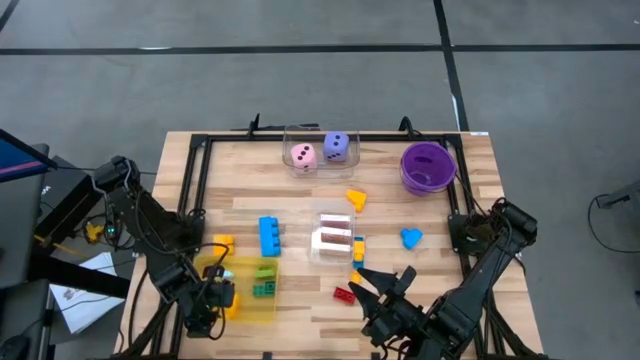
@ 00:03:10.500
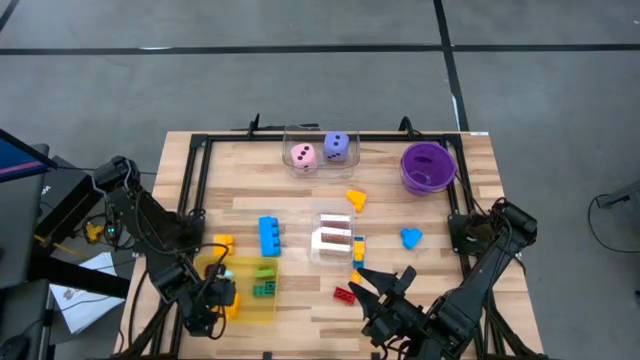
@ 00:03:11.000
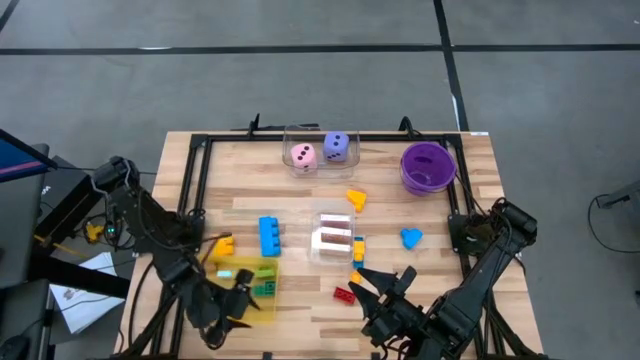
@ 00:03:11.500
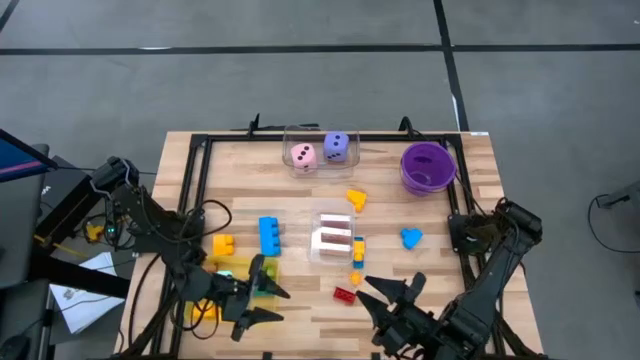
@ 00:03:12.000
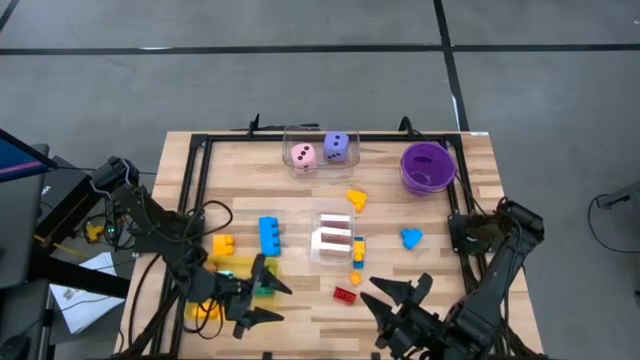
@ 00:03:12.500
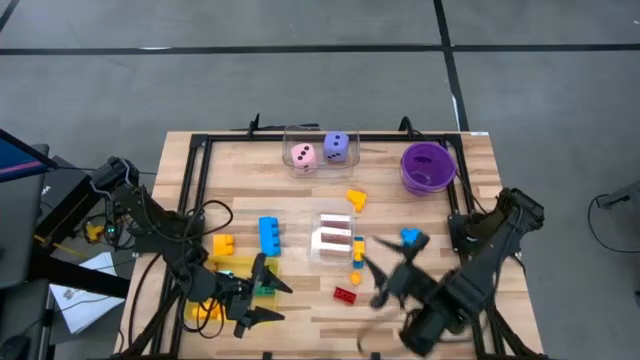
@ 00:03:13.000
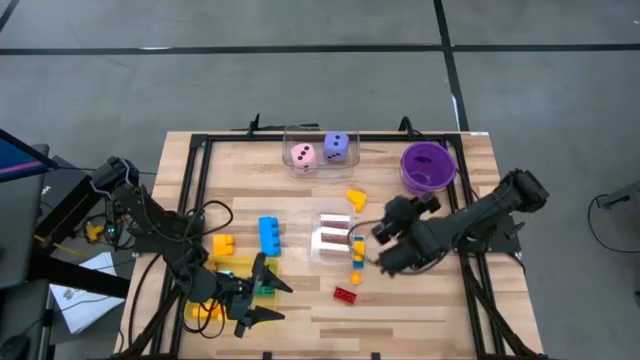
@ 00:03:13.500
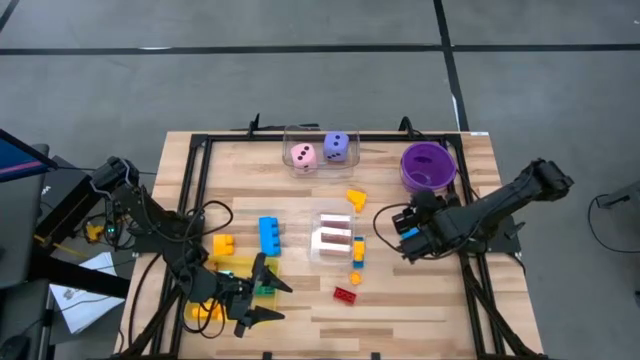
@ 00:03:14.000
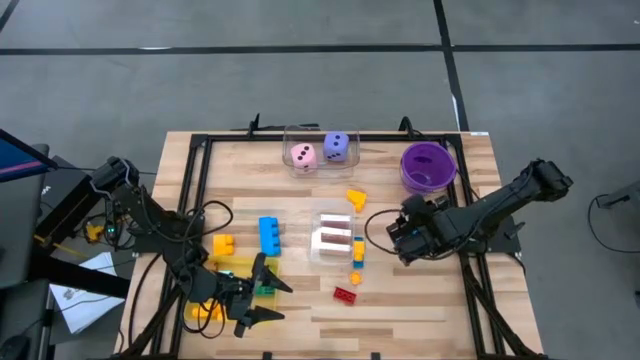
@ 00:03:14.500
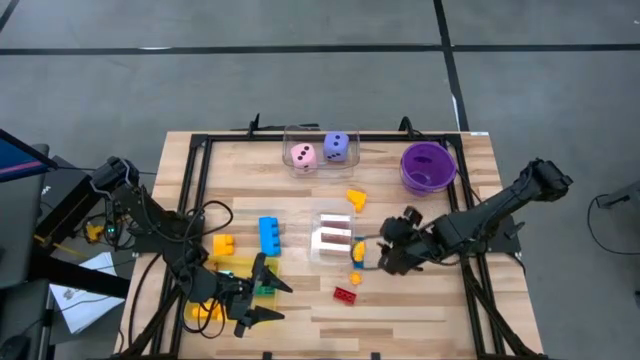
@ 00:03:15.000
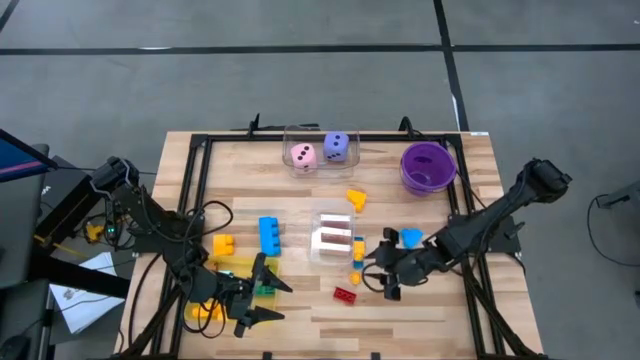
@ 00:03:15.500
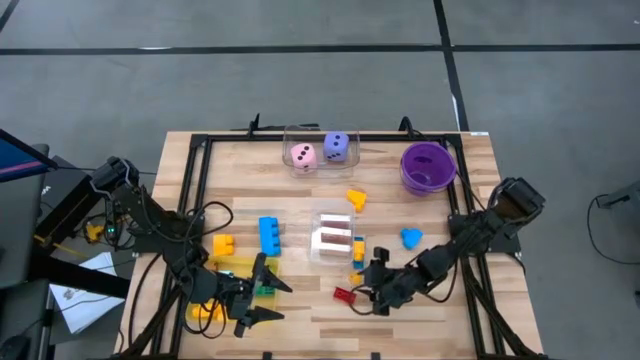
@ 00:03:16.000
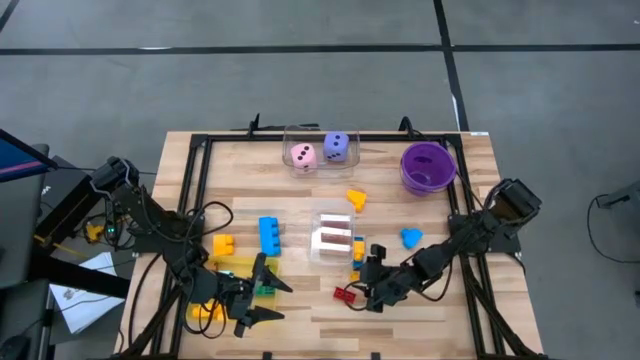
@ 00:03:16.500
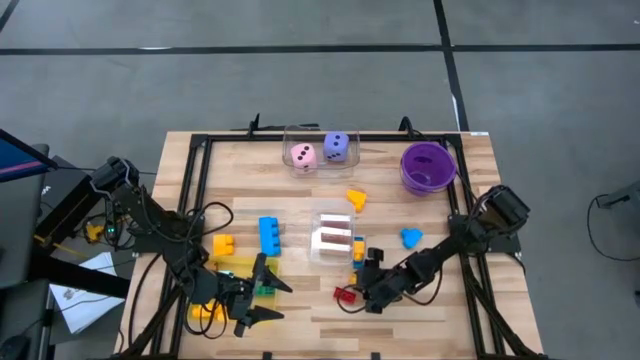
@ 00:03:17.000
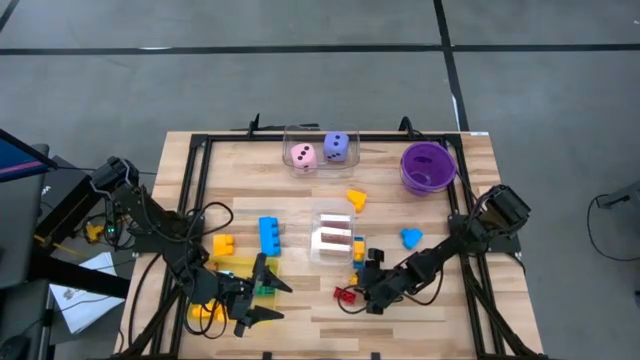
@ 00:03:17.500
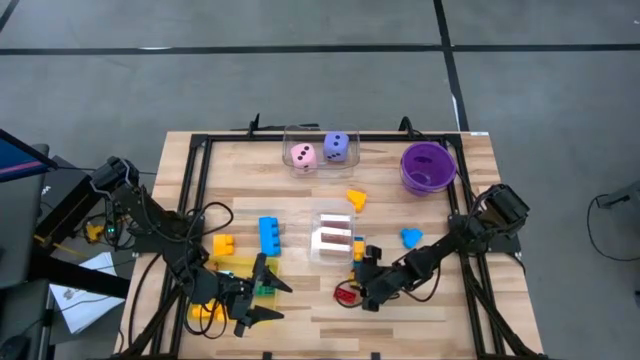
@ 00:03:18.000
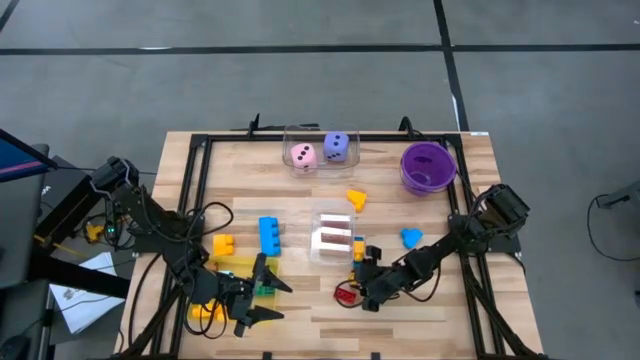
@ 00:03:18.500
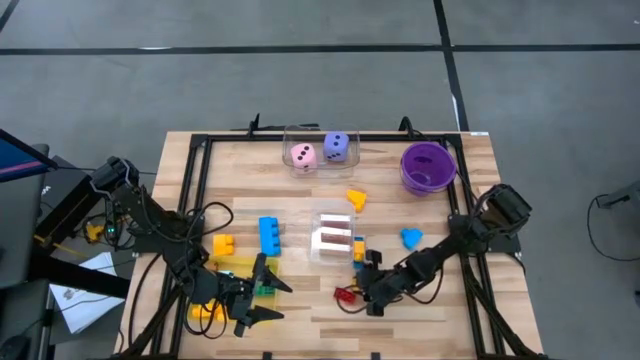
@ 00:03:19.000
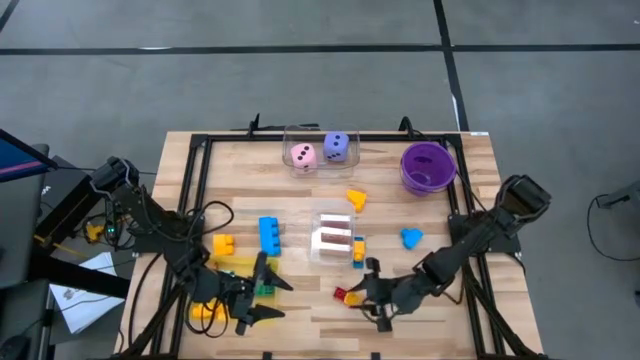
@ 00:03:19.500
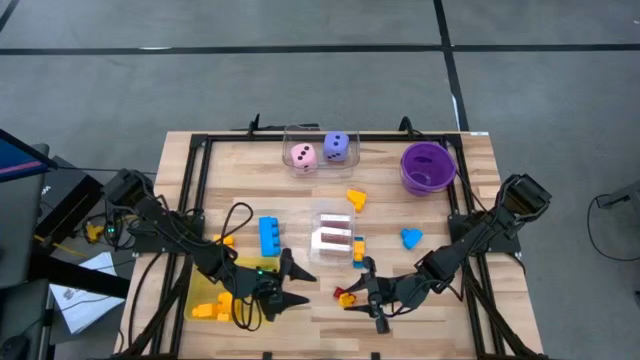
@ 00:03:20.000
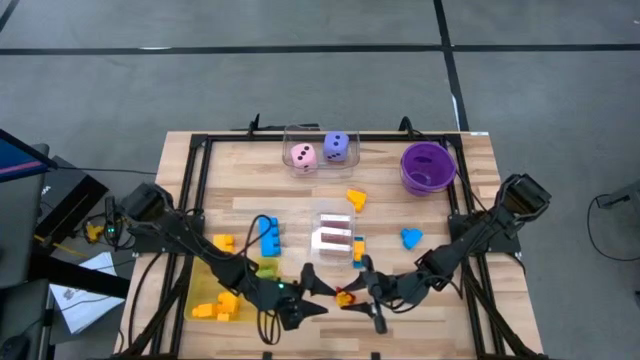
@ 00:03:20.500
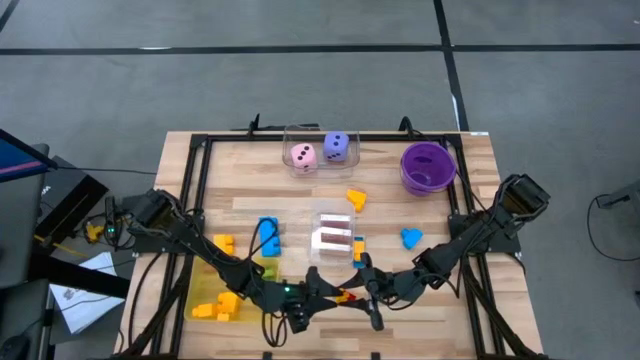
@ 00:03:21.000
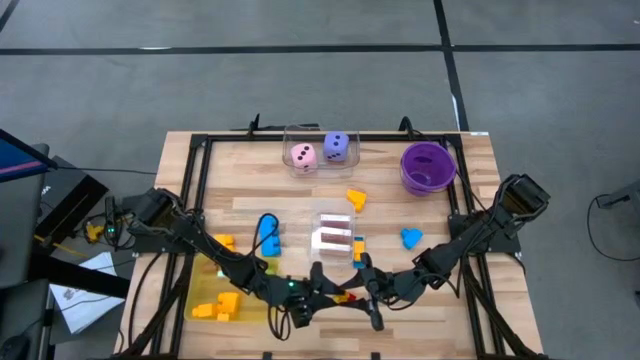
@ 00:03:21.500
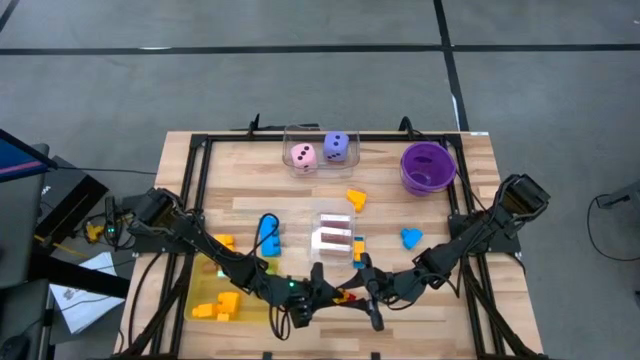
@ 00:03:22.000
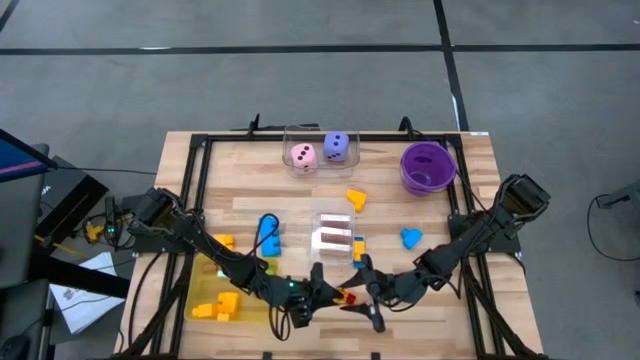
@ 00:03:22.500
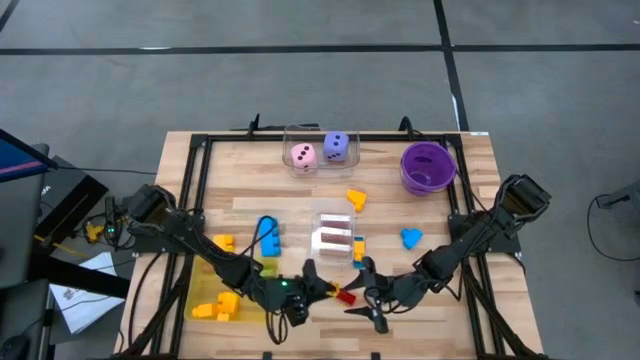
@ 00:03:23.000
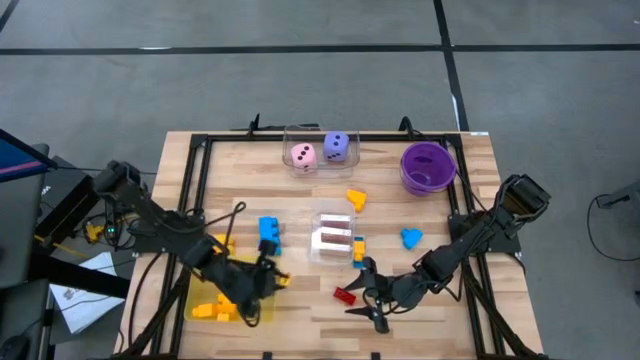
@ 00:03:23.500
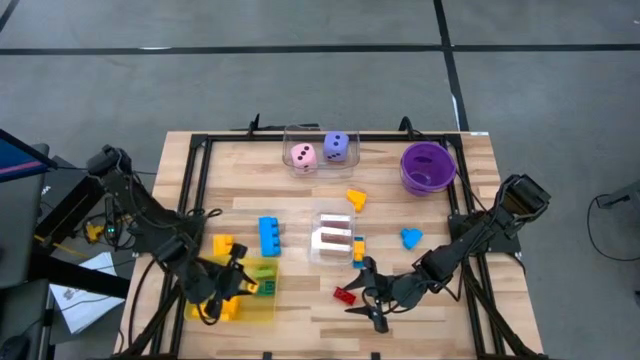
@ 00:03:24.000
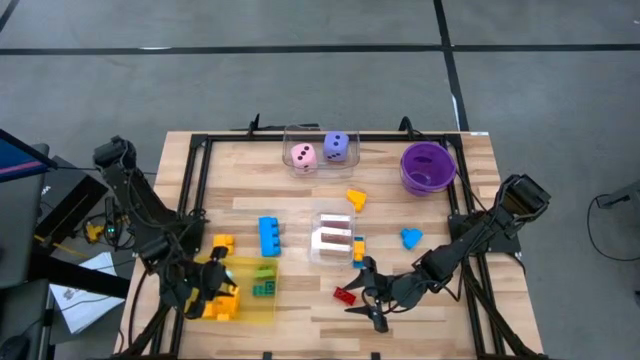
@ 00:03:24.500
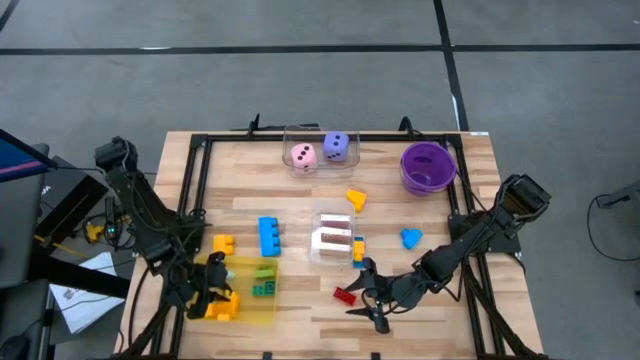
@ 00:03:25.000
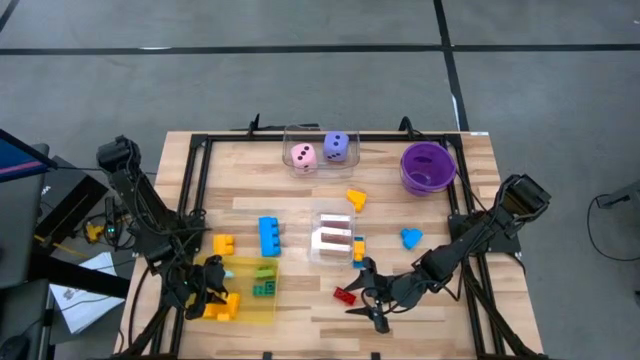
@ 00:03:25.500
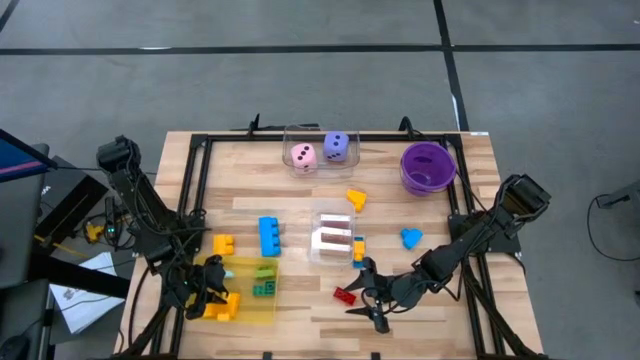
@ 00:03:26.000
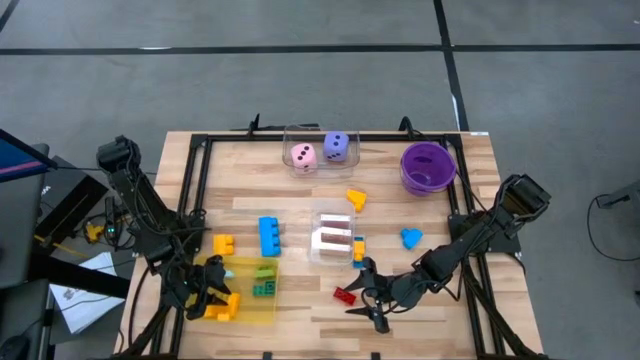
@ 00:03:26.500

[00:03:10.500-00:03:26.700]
Task: Pick & Place Toys
Put the yellow game piece into the yellow bin

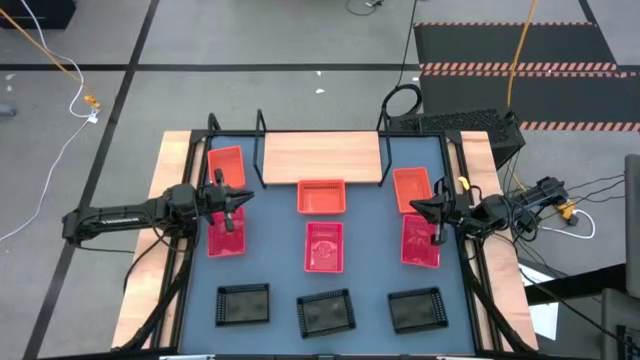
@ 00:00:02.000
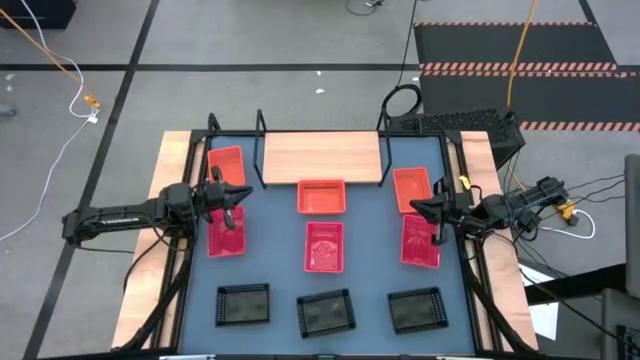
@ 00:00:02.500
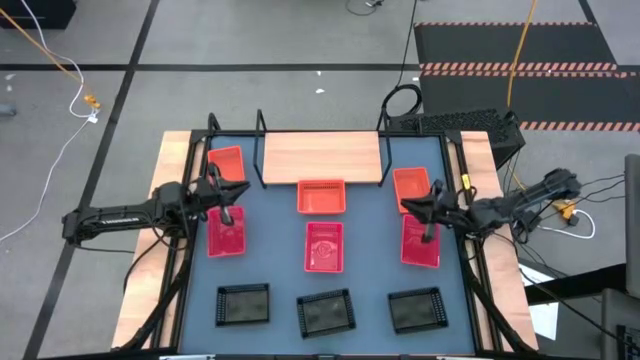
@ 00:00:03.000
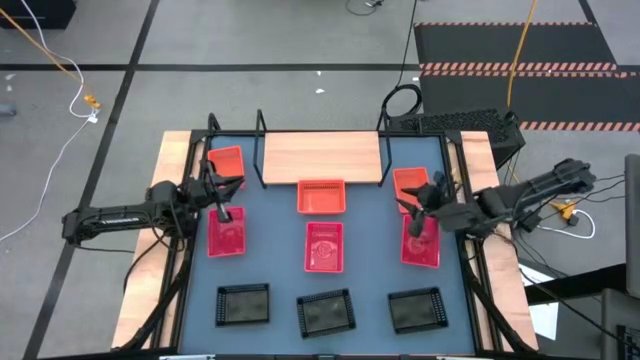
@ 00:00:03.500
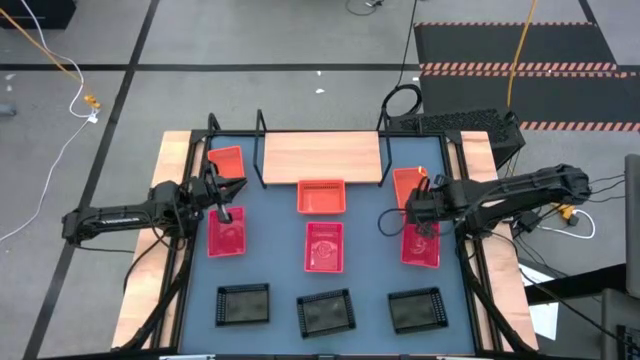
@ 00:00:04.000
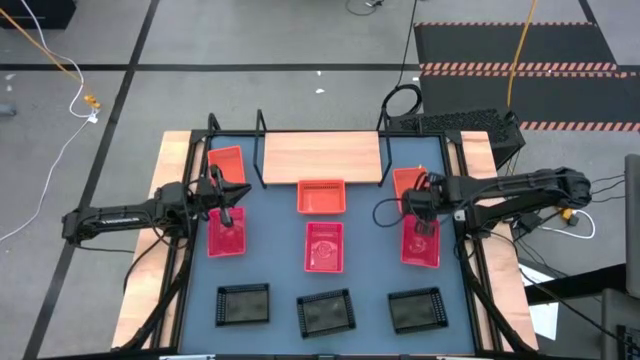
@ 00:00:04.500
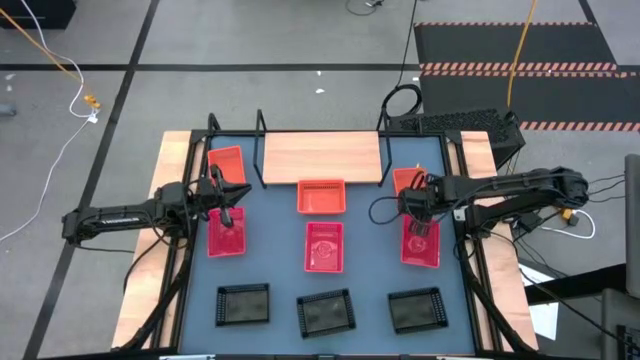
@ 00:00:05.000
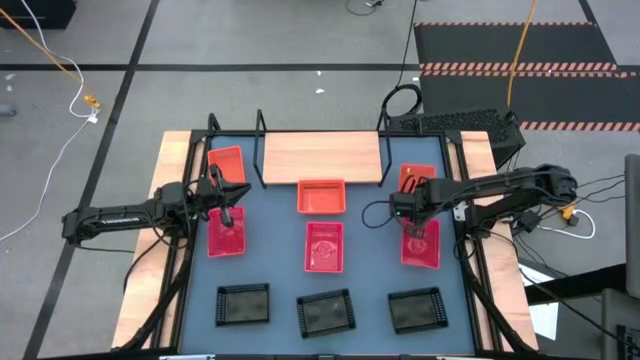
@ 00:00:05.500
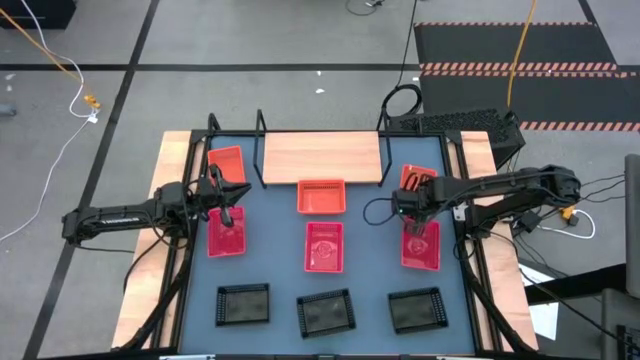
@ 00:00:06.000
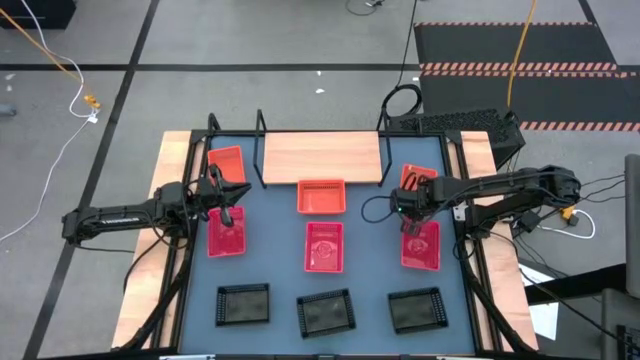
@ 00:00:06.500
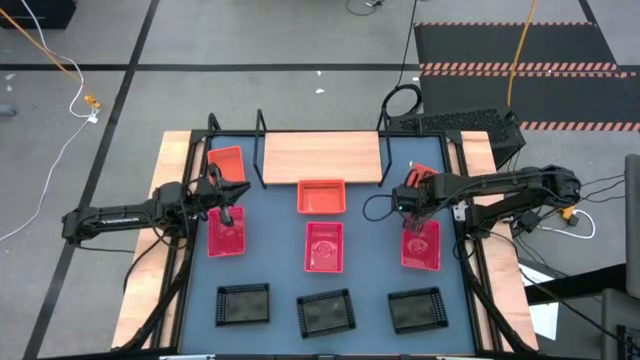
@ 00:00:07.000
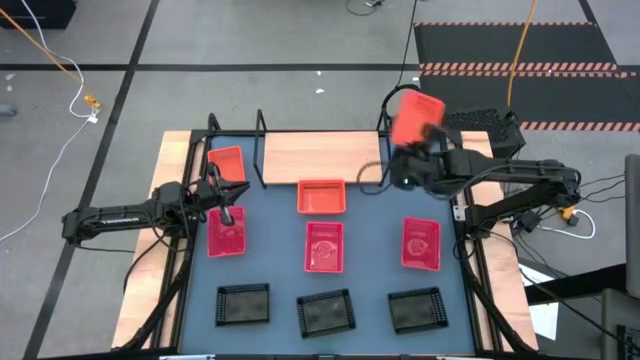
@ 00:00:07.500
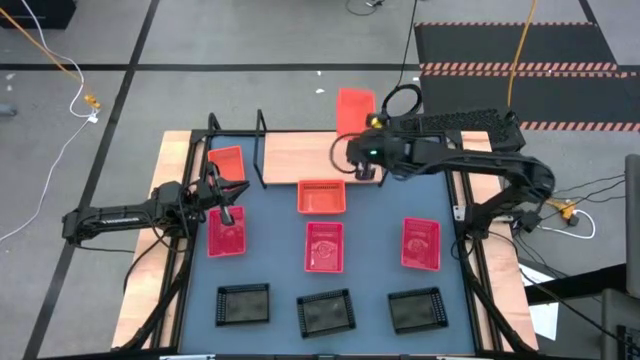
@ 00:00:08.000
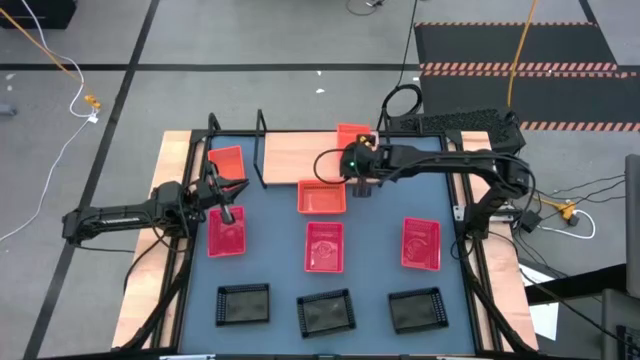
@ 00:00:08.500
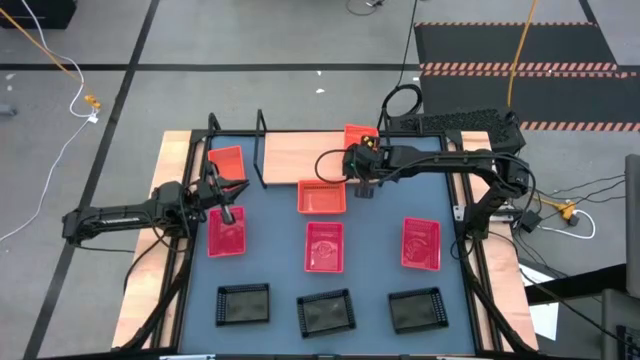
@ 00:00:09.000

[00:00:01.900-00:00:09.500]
Task: Stack baskets on shelf by color
Put the right orange bin on the shelf
